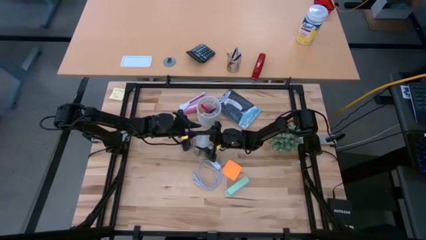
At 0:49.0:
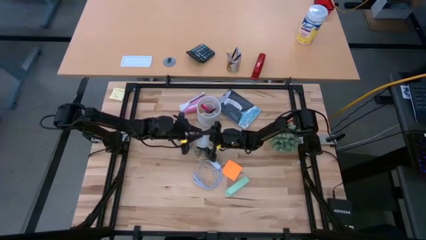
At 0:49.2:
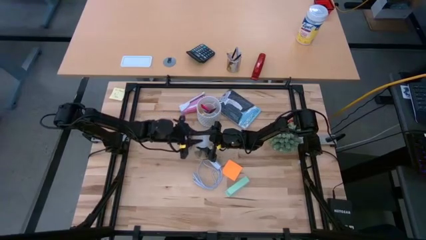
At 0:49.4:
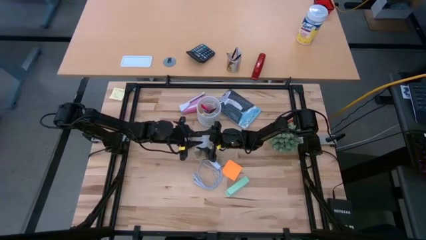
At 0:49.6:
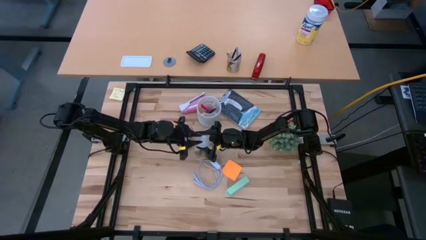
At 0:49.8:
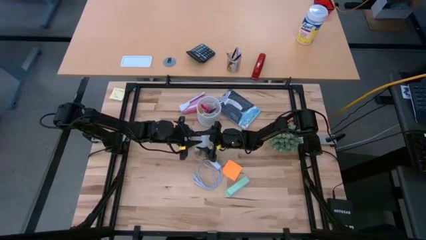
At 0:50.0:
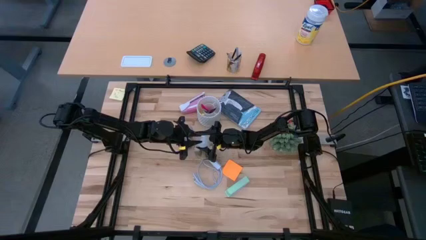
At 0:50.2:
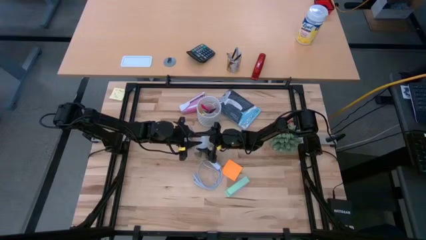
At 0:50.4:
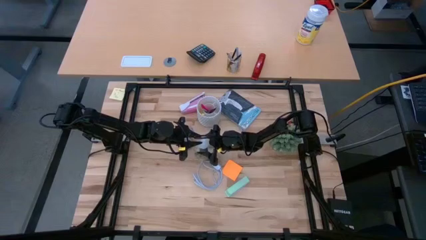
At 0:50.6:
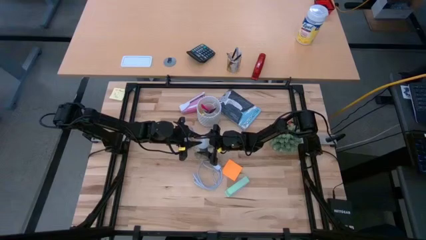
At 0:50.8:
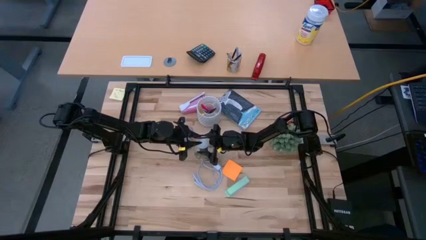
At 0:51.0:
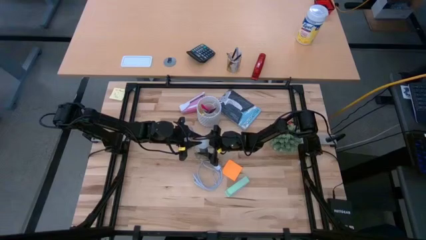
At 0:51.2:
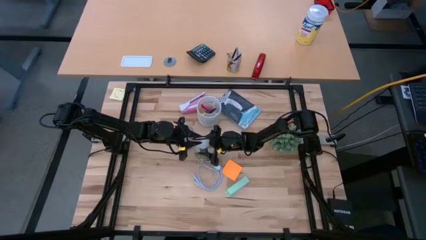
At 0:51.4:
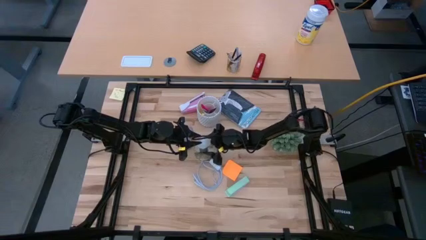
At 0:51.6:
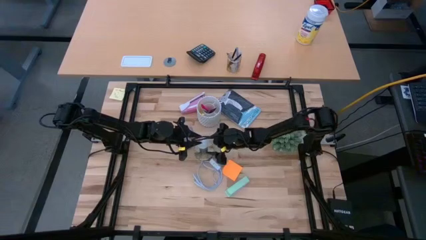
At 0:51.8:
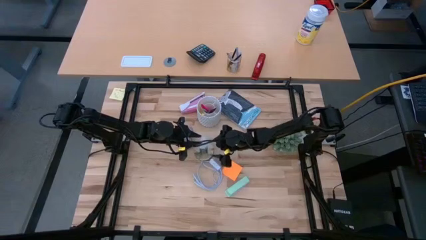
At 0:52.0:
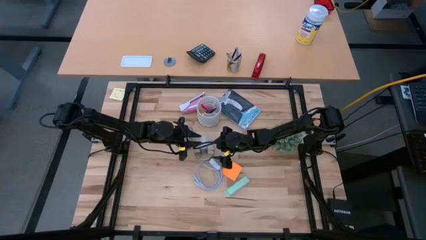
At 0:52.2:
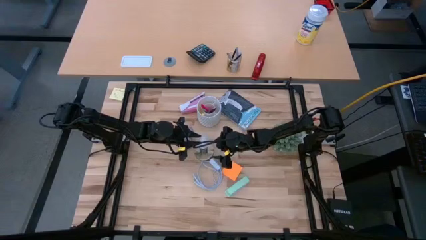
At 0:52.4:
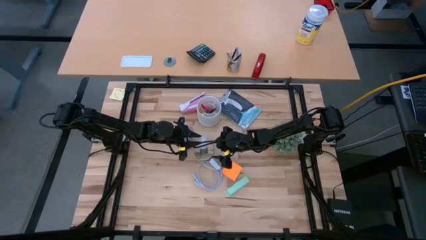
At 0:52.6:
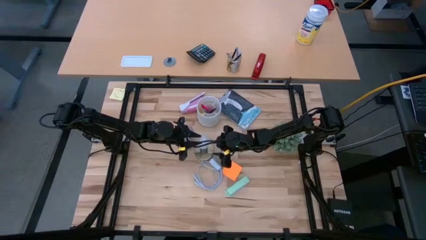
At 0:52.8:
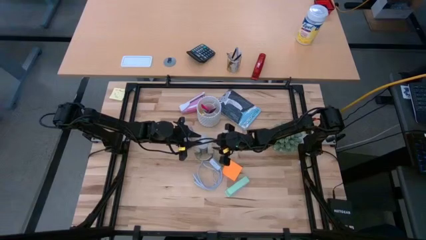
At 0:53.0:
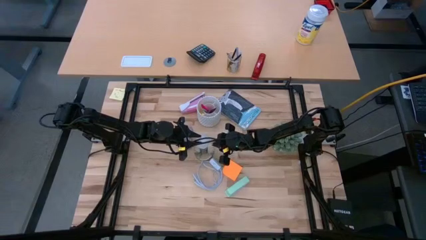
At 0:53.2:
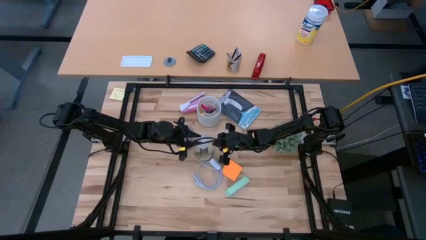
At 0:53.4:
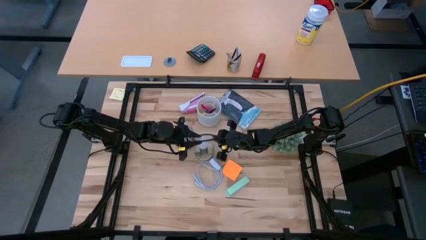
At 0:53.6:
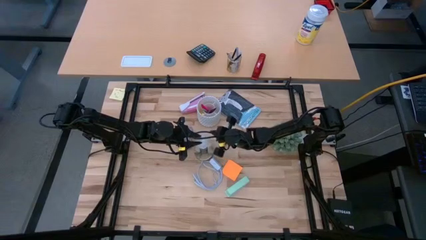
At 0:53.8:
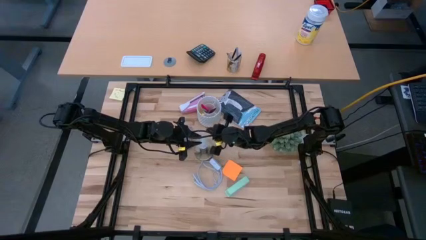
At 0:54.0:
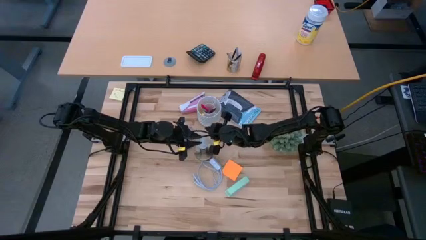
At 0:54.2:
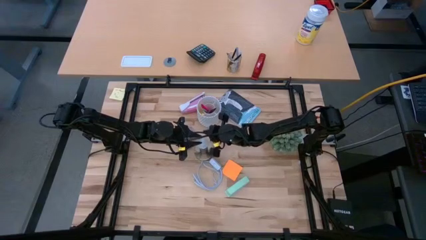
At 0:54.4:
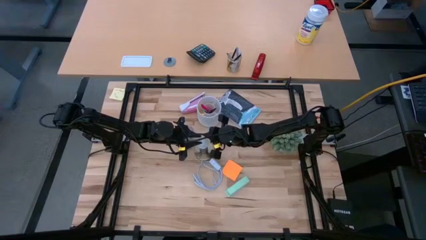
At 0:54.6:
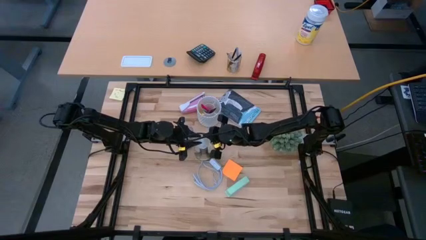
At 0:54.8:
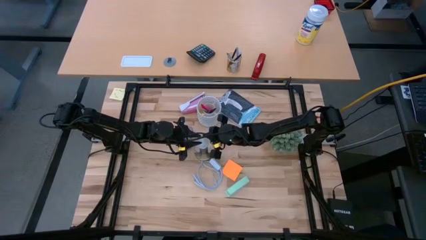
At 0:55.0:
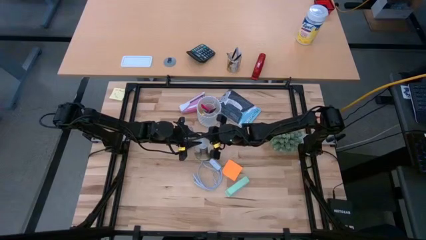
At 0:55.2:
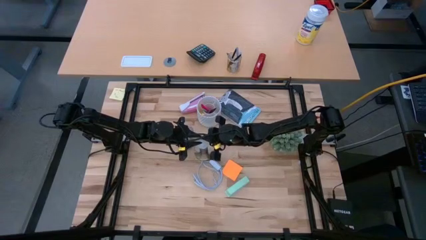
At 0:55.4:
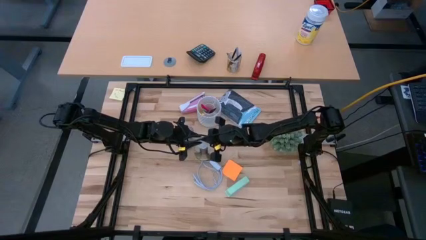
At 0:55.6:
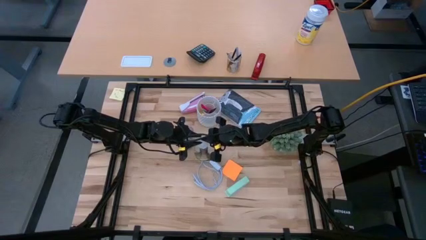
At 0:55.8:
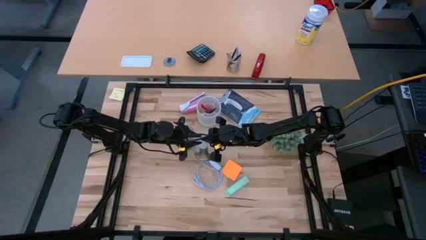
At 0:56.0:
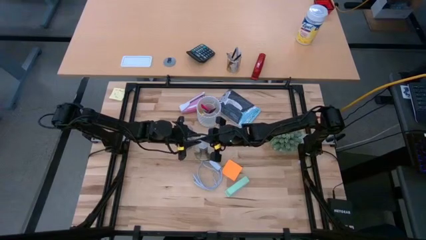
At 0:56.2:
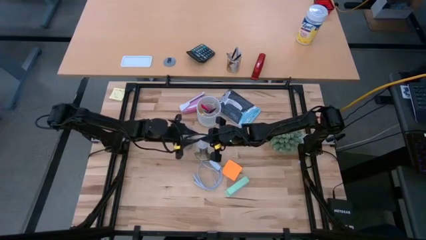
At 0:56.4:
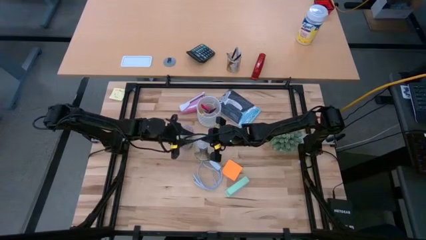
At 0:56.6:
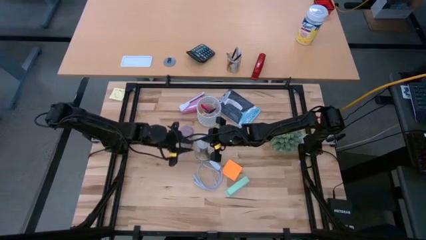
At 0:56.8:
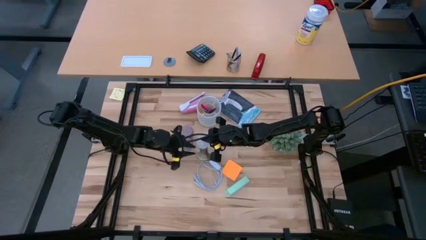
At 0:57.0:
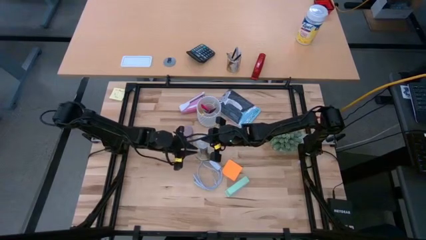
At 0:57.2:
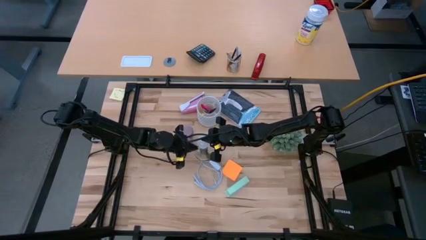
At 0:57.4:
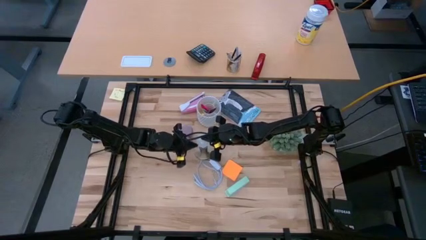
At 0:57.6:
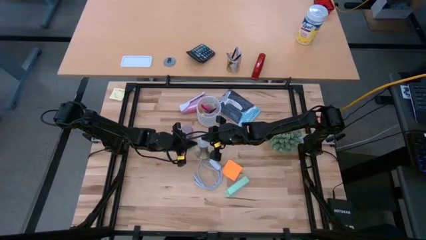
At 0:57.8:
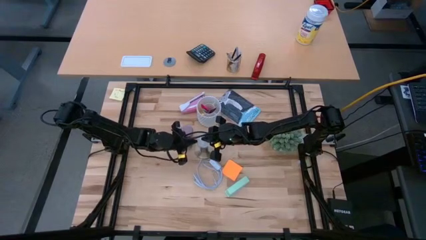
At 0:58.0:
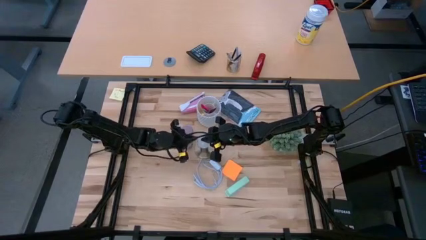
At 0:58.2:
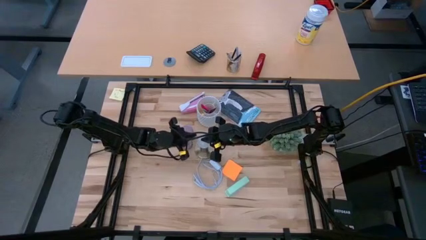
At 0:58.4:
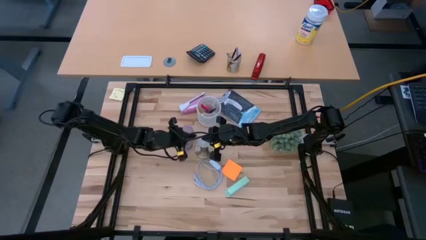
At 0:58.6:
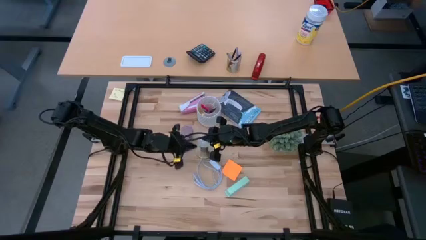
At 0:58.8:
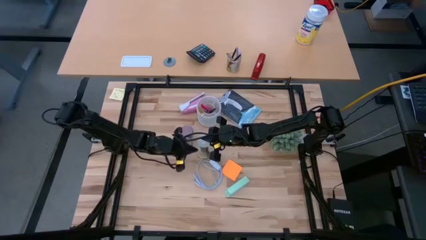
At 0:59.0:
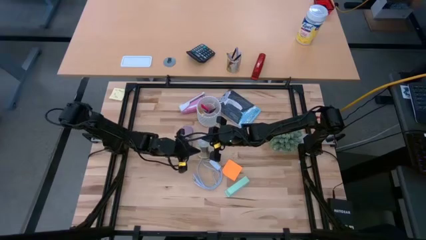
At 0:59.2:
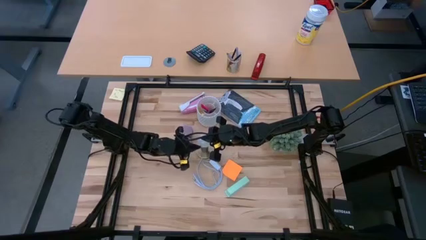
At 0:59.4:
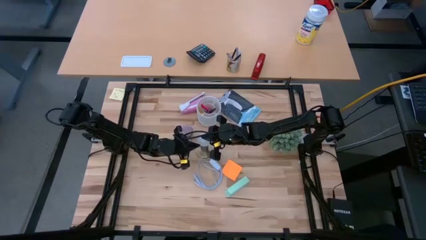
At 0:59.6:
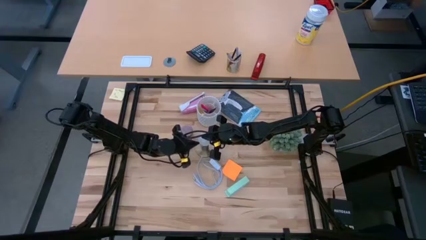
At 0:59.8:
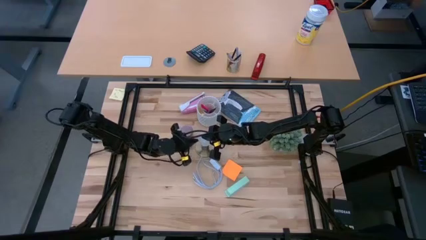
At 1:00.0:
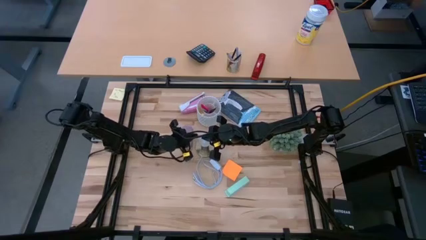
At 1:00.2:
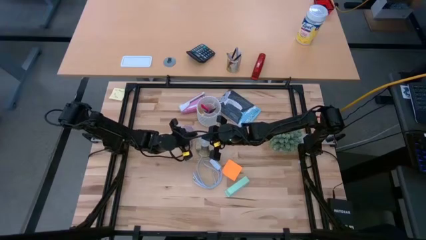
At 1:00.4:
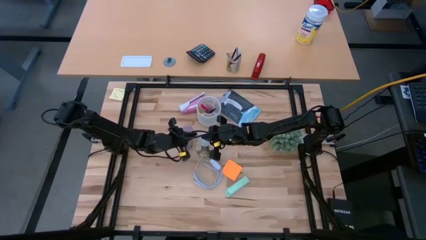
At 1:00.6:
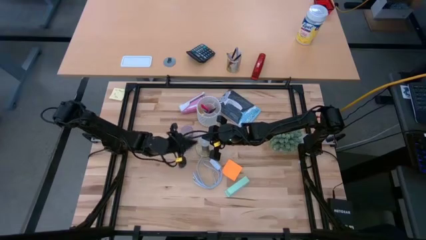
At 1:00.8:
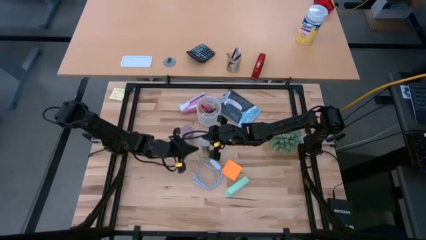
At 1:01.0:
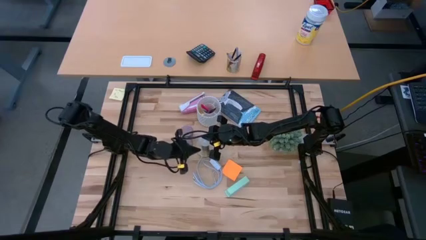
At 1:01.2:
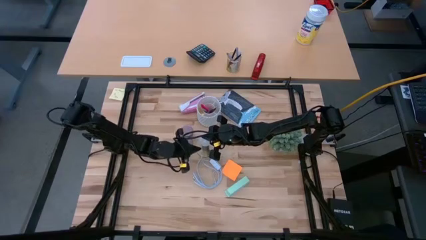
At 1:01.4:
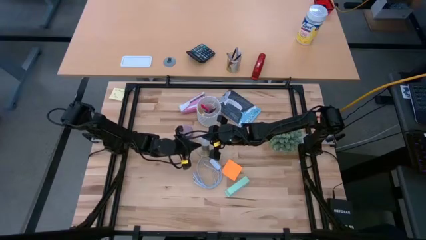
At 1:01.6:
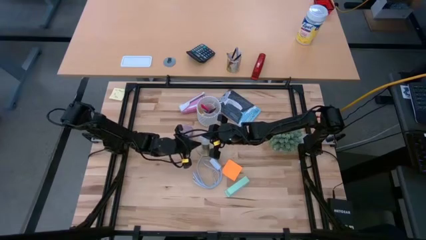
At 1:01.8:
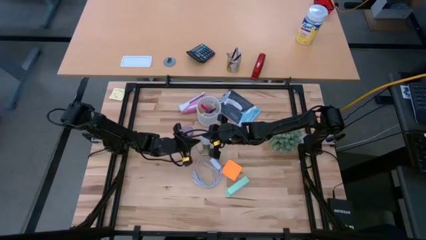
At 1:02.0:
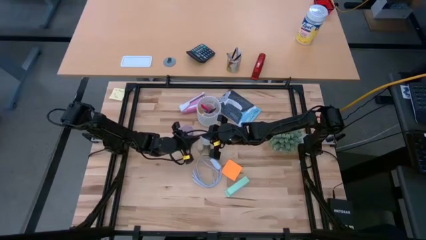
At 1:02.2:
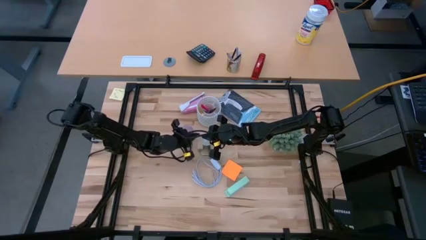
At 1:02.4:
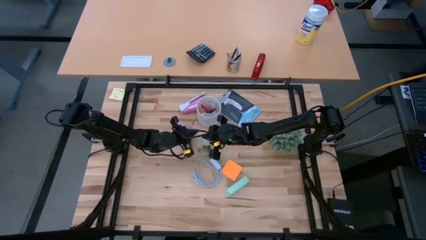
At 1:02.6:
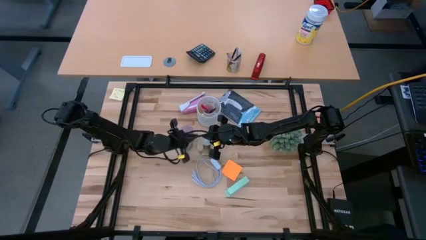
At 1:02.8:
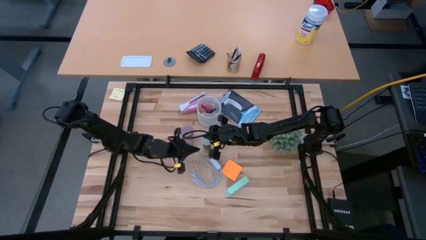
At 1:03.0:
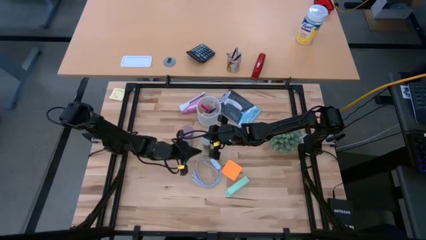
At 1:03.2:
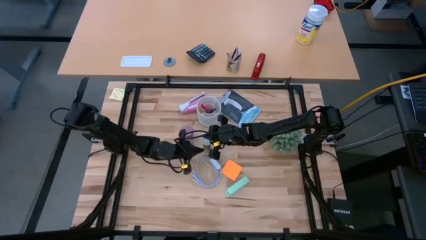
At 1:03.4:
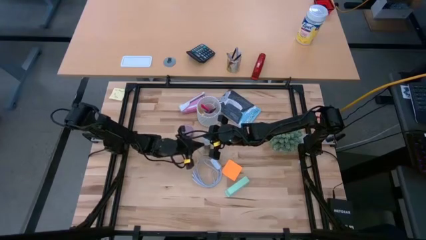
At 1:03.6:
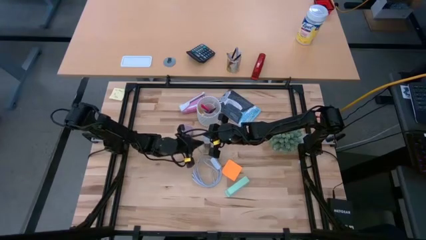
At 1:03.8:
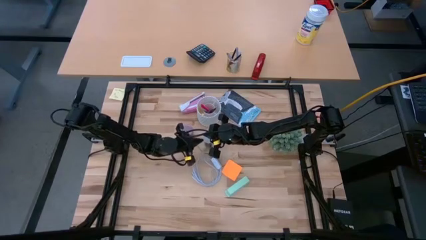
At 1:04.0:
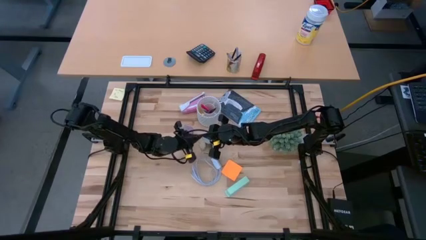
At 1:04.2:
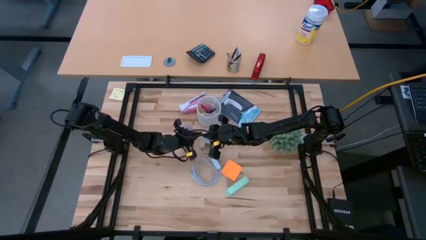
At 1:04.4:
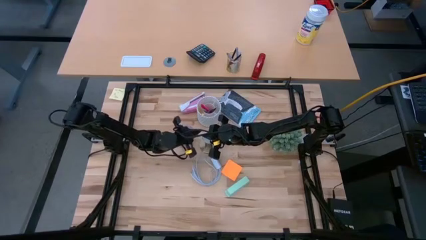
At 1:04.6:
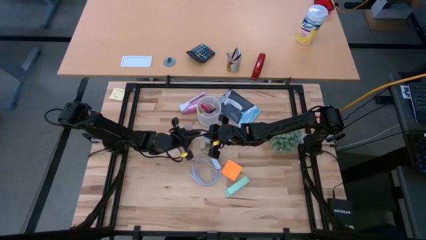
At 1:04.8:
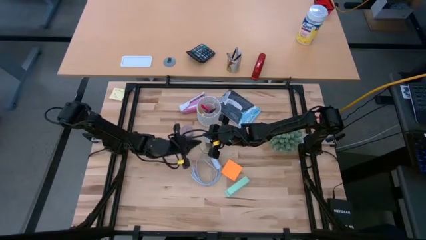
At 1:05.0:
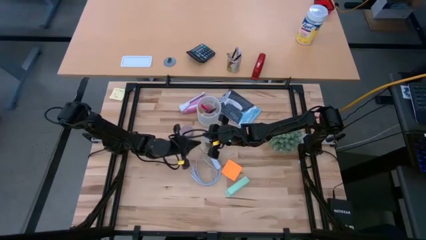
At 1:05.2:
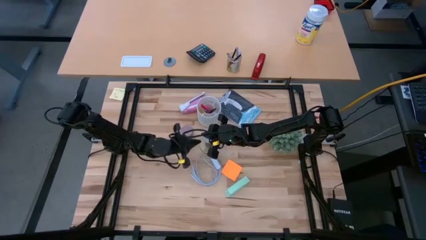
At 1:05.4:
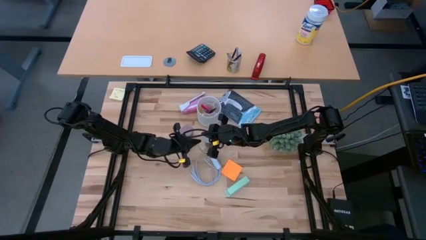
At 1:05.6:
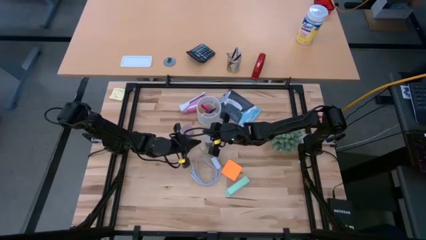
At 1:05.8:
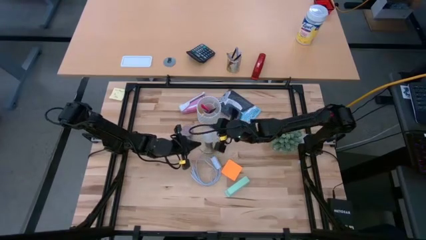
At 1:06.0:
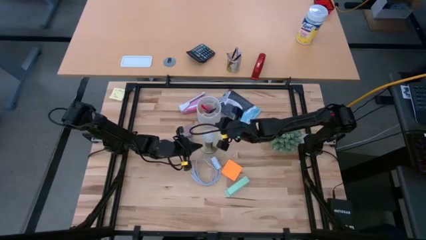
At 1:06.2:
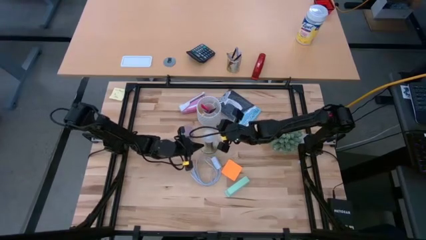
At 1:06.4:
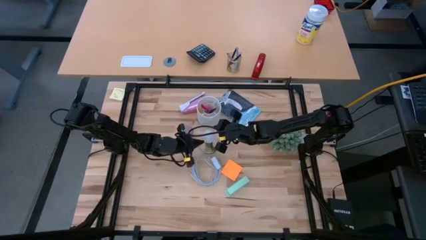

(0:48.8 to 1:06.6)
Task: Screw lightbulb
Insert the lightbulb into the lamp
